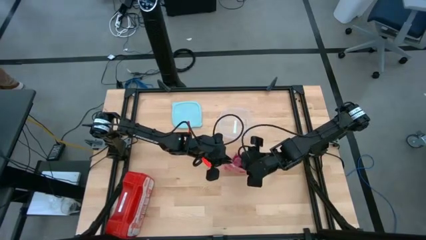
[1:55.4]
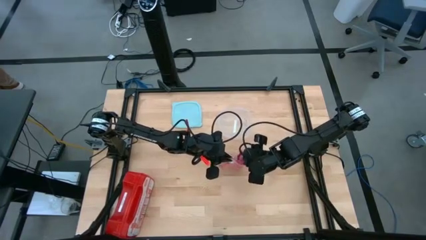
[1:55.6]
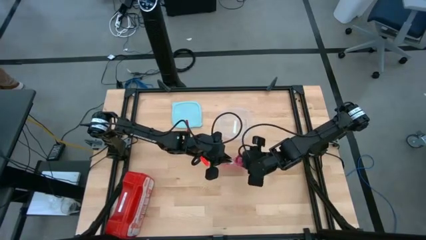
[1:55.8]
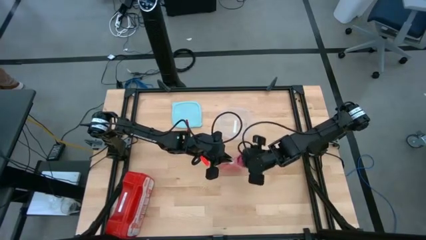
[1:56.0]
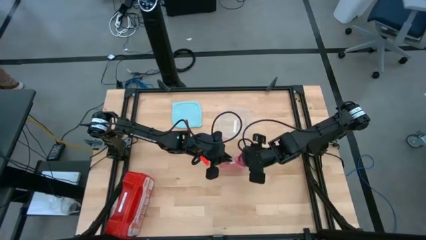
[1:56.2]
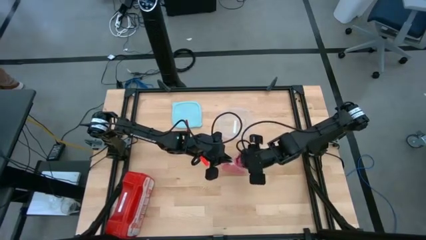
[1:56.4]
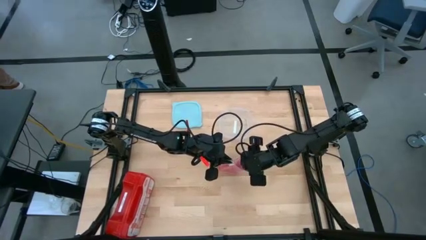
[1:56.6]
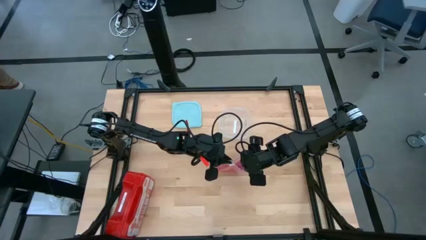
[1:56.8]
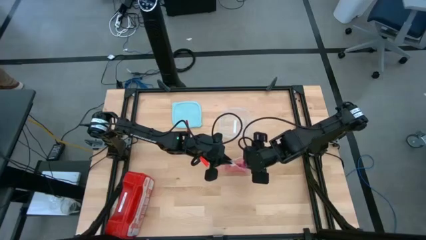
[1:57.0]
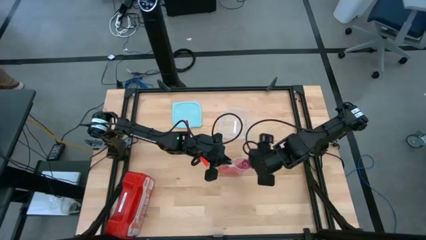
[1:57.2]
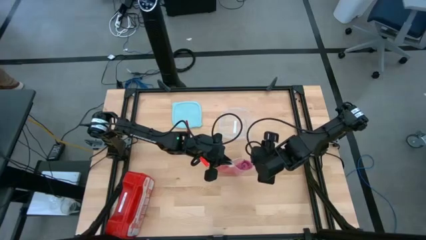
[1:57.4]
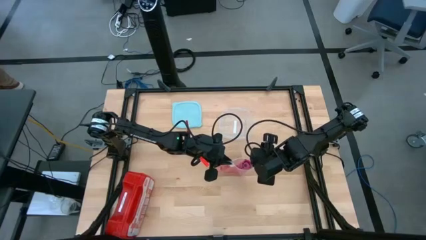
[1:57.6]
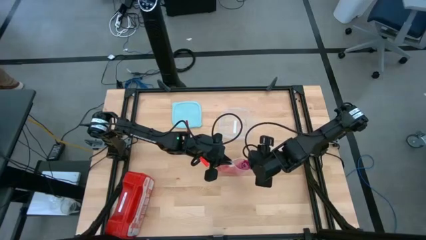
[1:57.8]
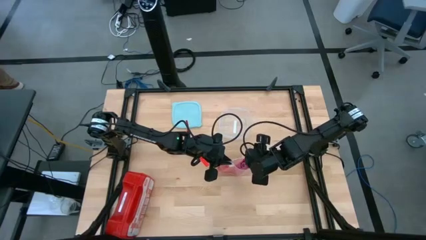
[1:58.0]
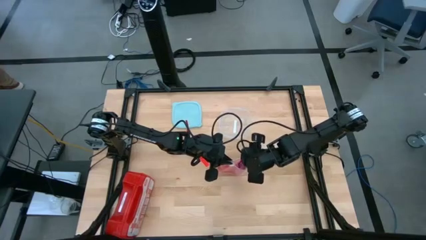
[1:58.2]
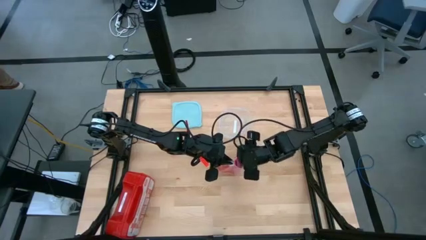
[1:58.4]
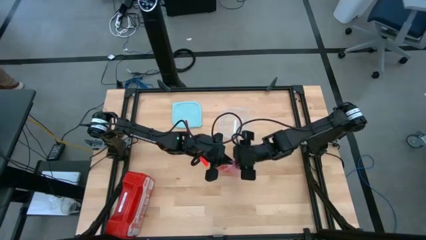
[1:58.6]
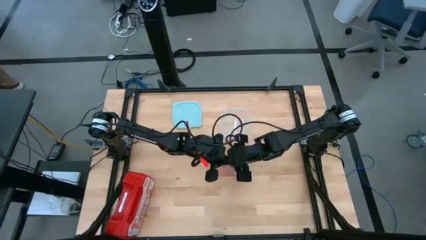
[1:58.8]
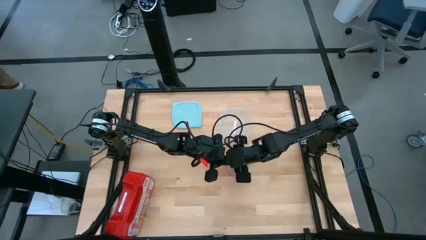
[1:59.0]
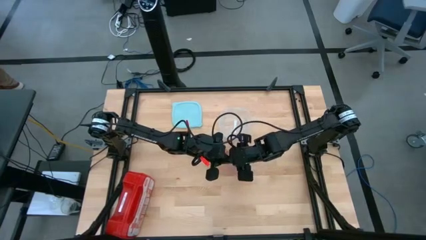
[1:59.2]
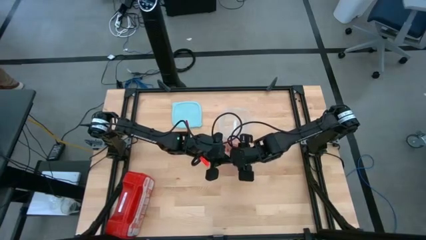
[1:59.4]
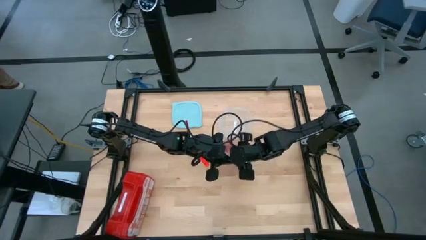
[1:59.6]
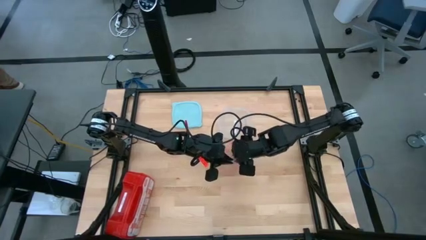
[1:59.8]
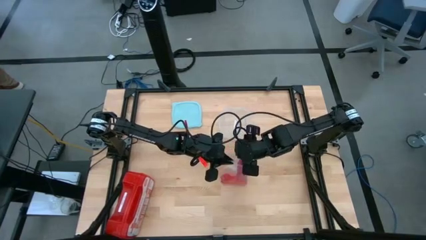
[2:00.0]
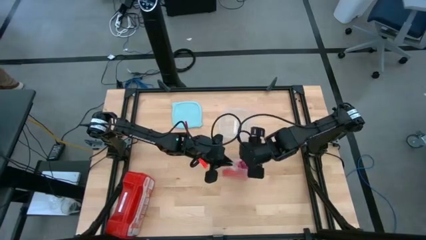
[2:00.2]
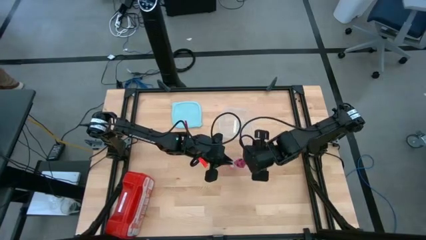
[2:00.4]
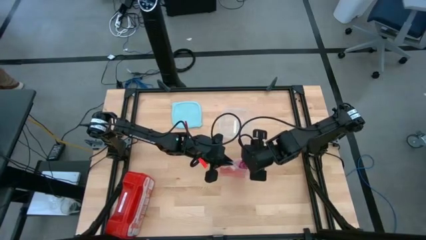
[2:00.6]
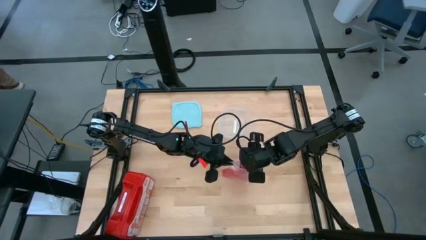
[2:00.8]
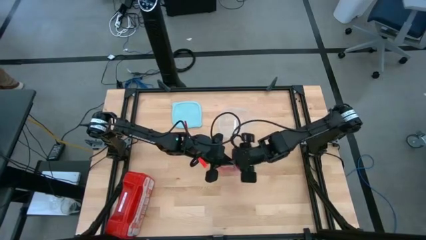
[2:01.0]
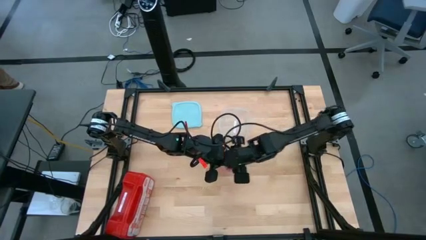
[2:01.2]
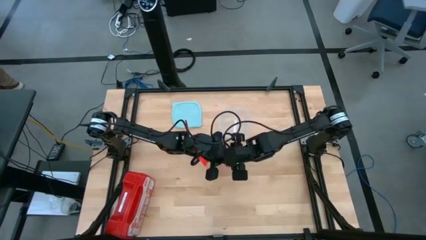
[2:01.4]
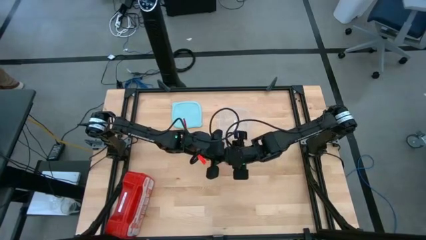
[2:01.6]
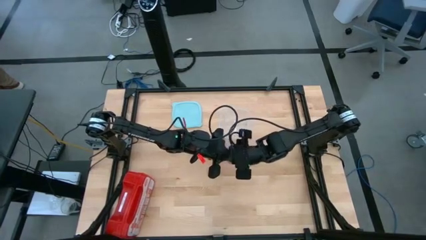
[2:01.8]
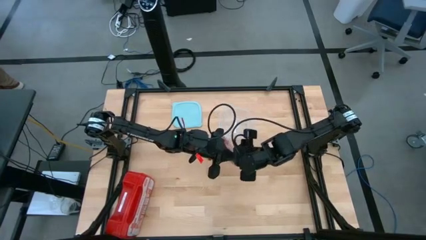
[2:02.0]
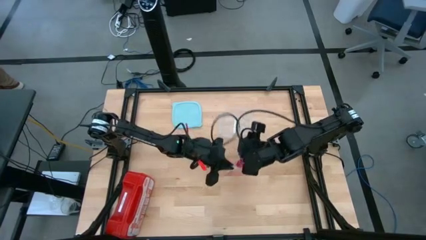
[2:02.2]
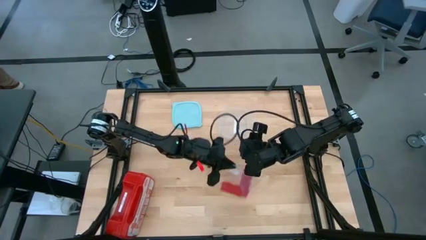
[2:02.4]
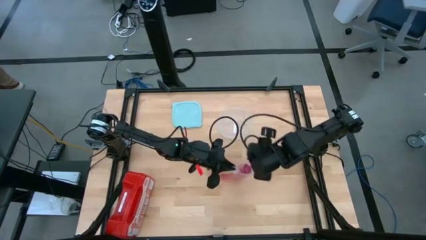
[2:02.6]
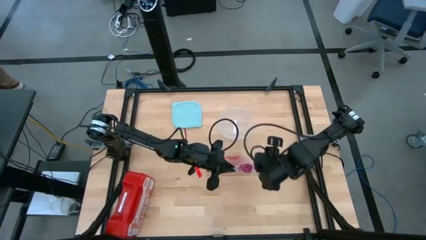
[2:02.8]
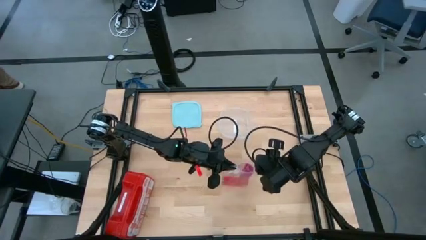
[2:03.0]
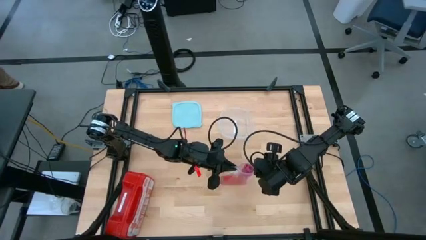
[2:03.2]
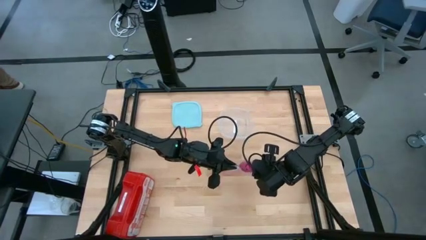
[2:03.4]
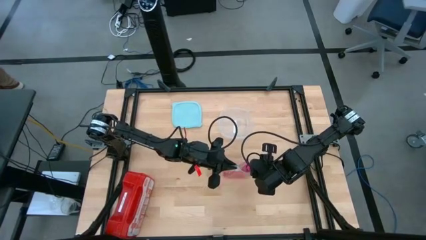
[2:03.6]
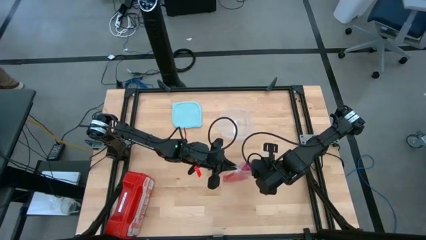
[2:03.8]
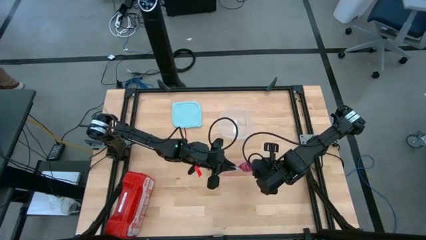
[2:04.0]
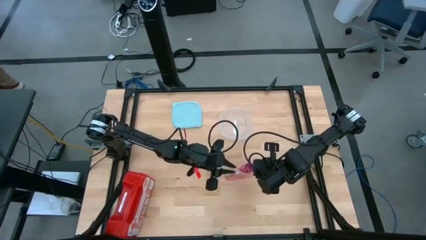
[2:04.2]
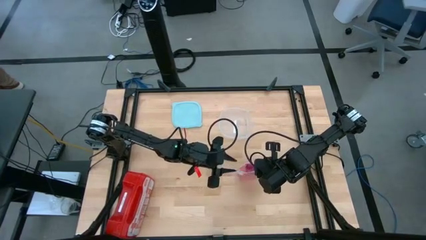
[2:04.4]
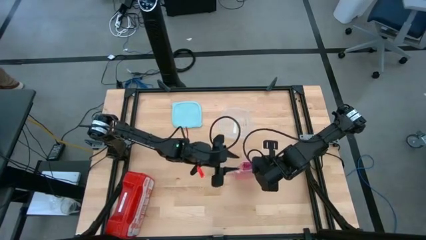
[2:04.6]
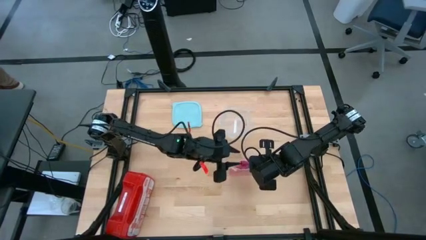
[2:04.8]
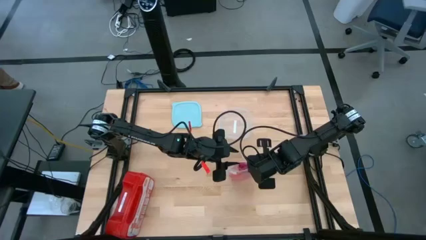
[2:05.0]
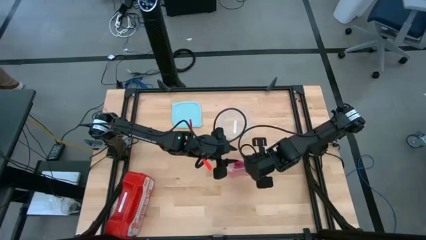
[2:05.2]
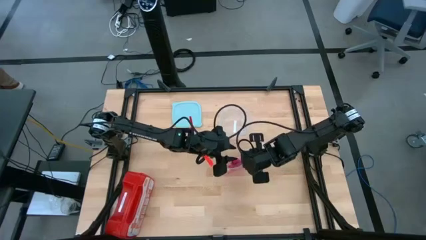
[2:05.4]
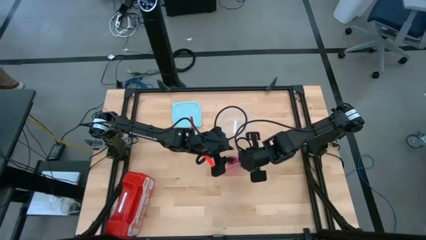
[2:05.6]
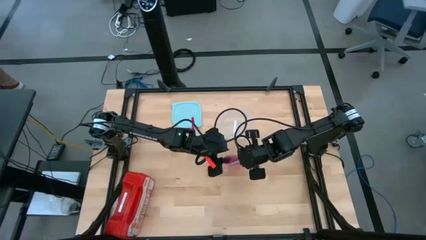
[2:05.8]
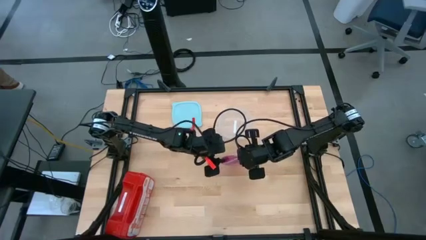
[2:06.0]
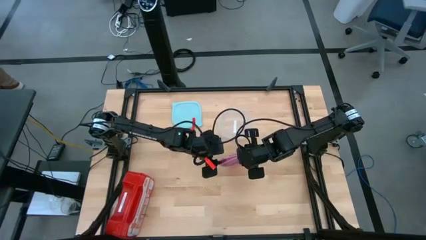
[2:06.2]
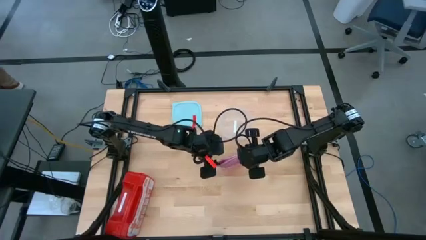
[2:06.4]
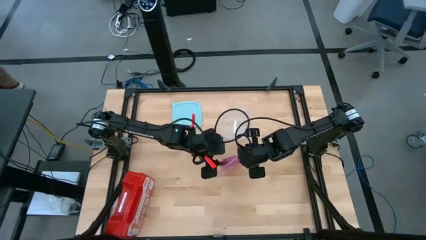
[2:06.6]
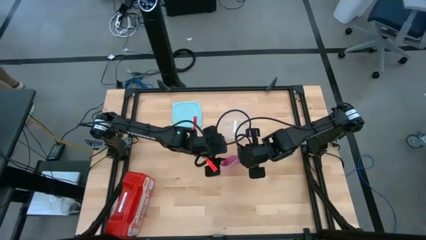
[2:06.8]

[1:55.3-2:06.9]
Task: Roll bandage
Put the rolled pink bandage into the transparent zip bag
